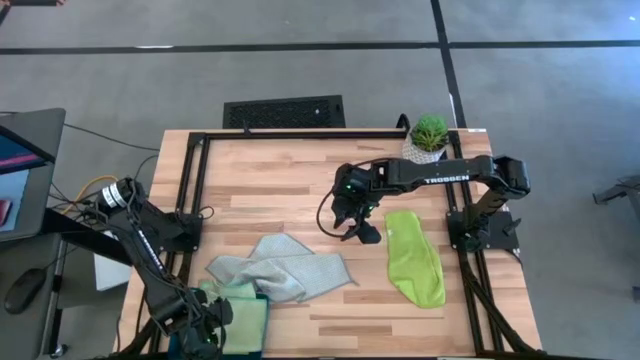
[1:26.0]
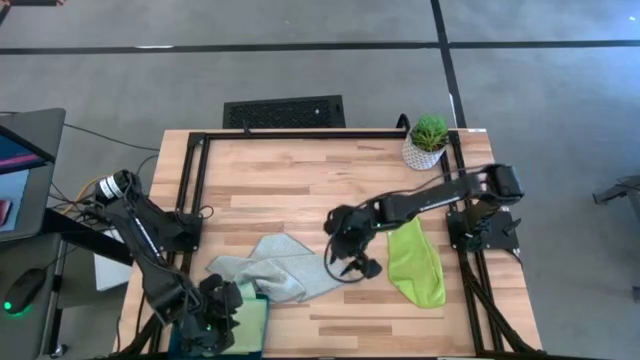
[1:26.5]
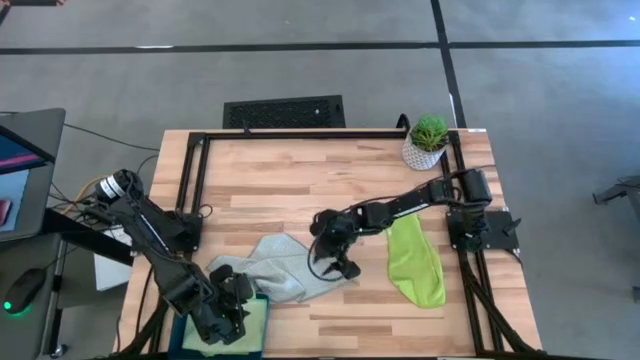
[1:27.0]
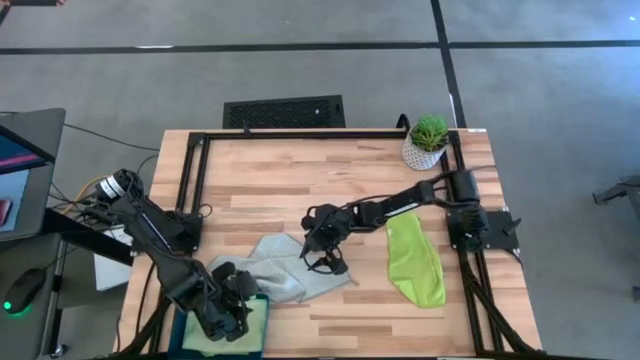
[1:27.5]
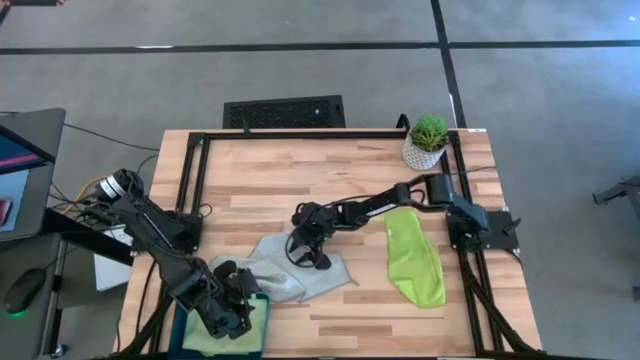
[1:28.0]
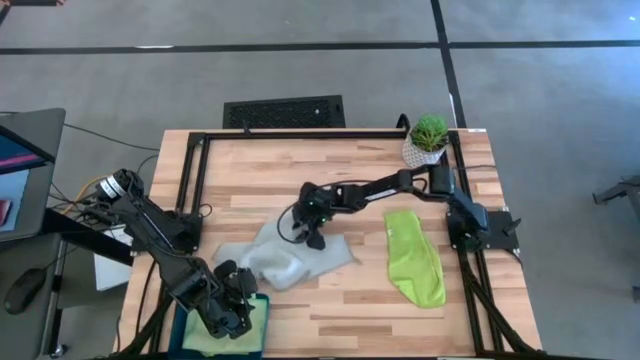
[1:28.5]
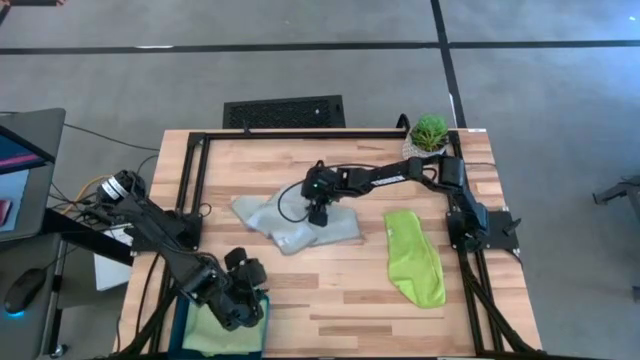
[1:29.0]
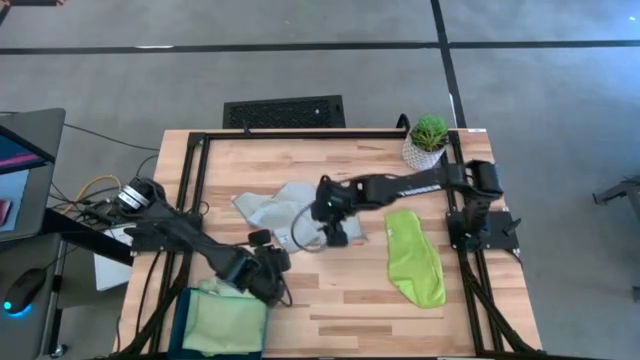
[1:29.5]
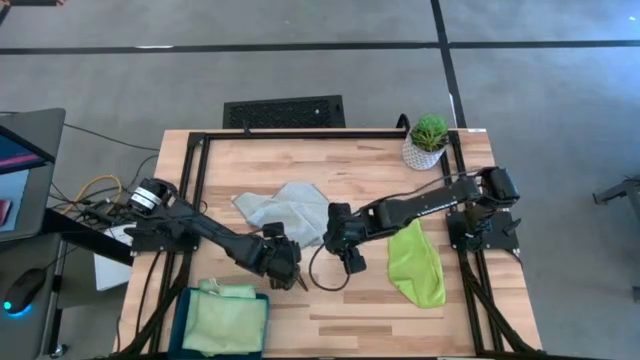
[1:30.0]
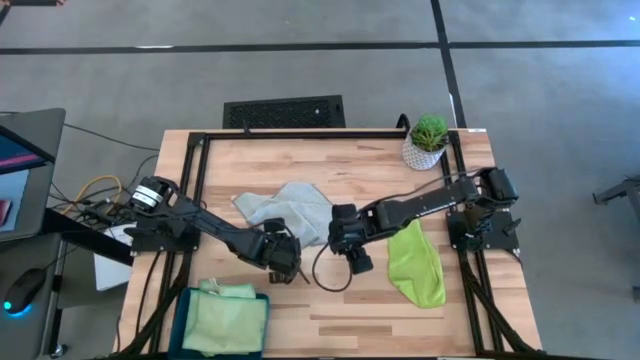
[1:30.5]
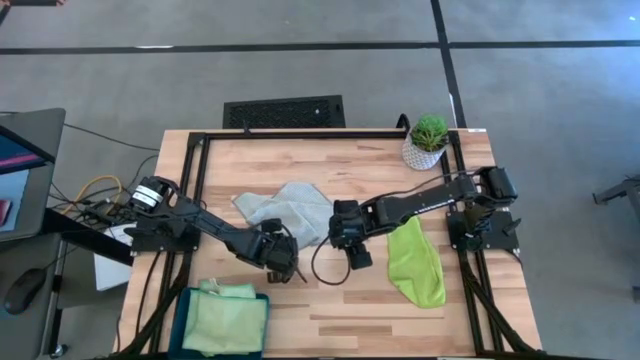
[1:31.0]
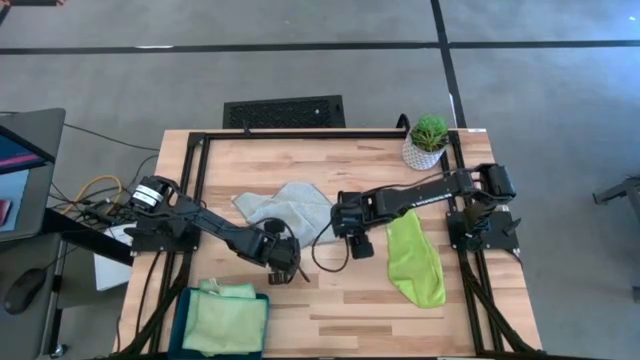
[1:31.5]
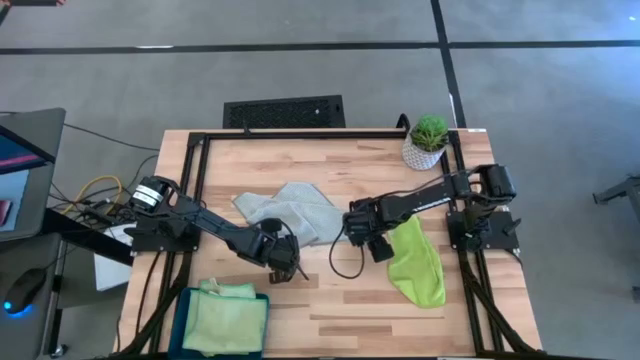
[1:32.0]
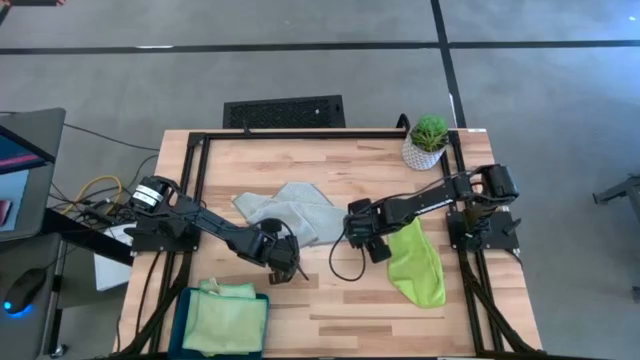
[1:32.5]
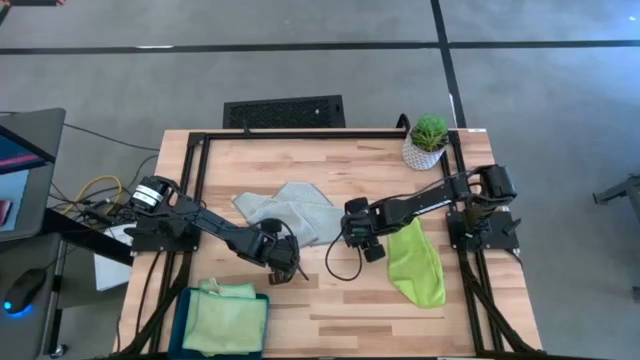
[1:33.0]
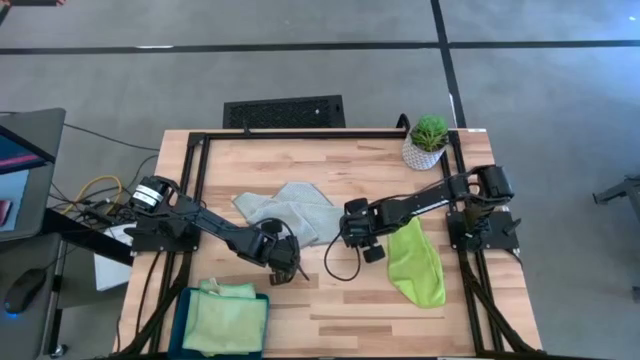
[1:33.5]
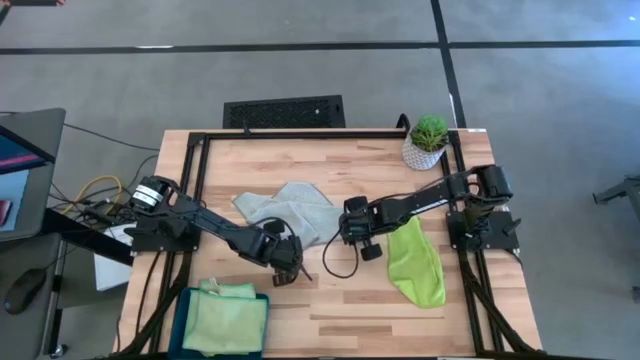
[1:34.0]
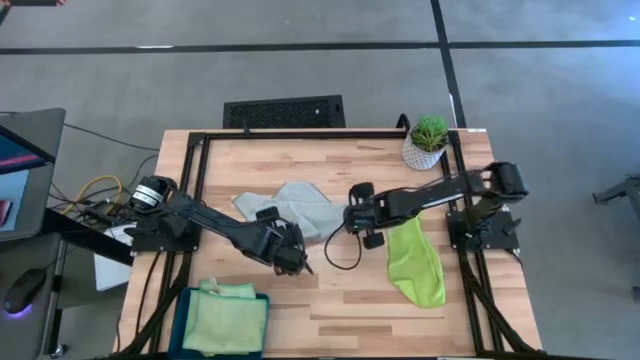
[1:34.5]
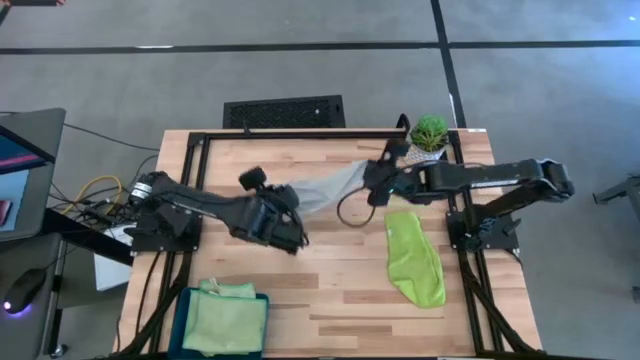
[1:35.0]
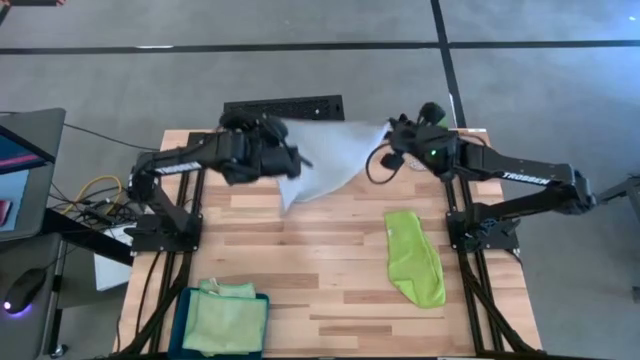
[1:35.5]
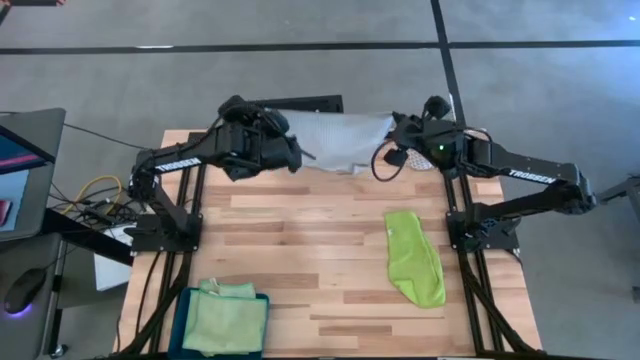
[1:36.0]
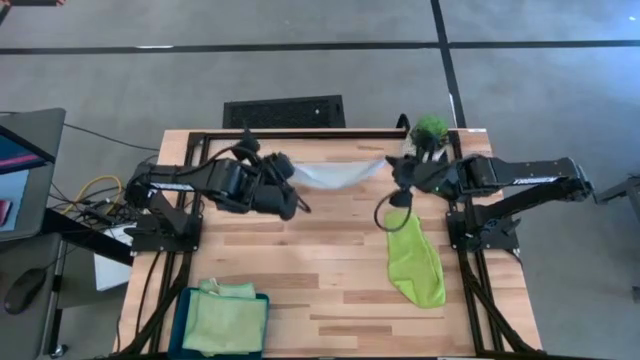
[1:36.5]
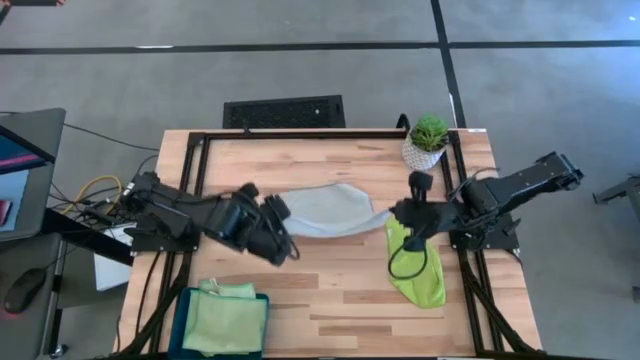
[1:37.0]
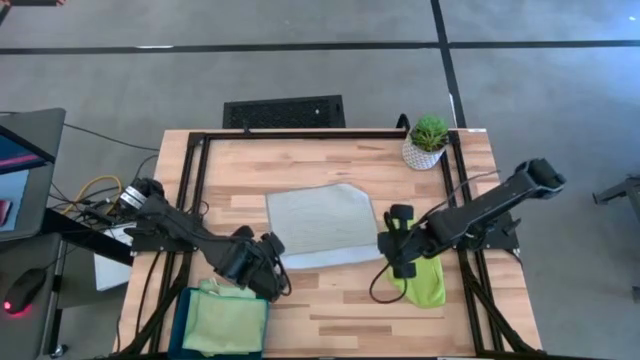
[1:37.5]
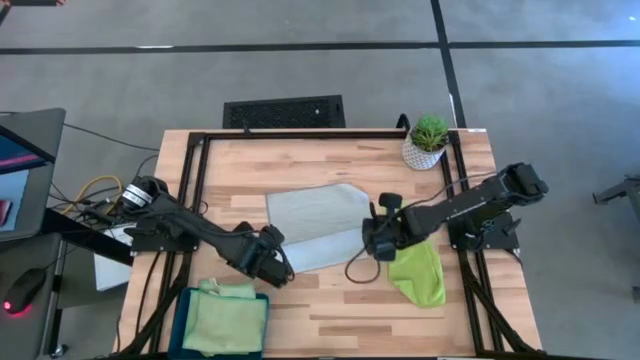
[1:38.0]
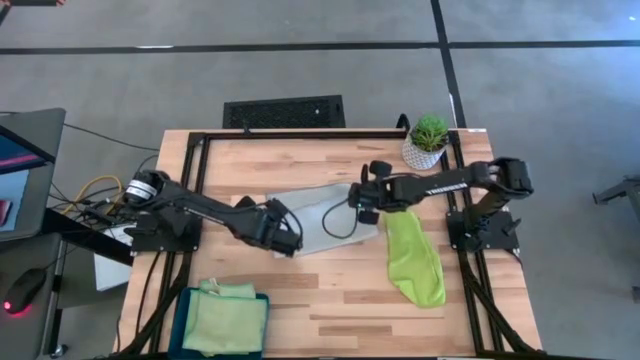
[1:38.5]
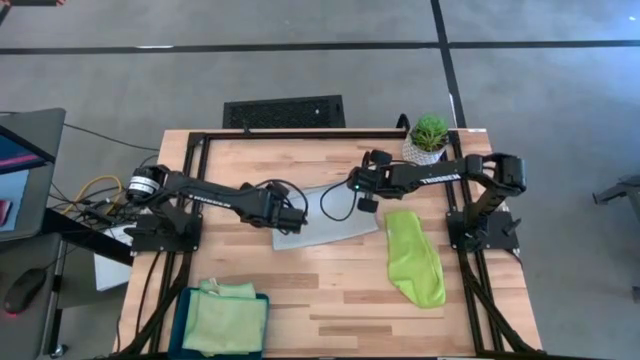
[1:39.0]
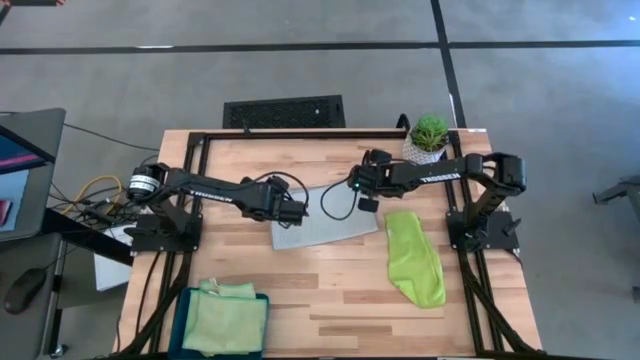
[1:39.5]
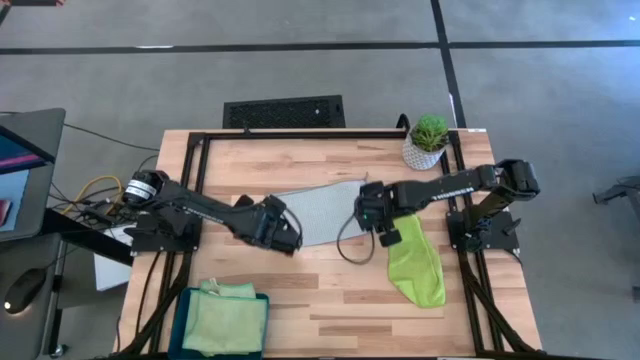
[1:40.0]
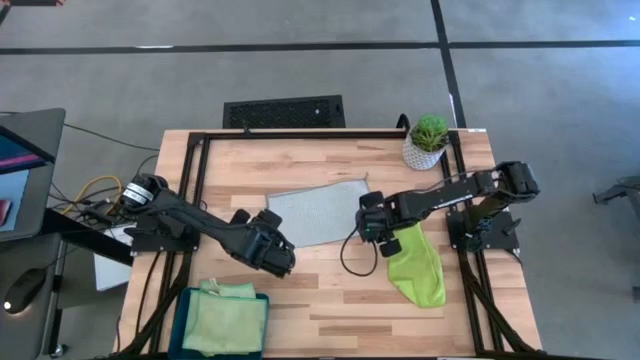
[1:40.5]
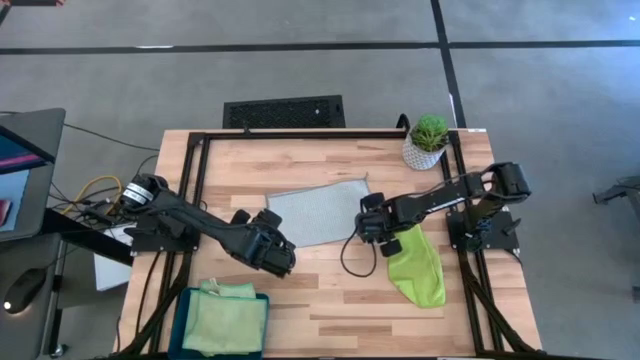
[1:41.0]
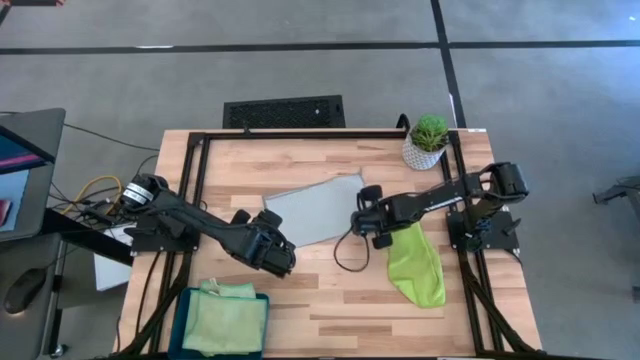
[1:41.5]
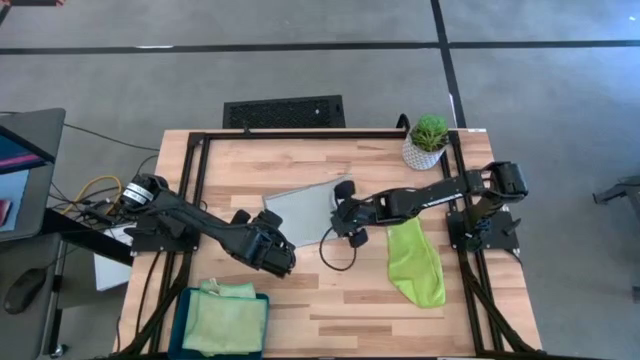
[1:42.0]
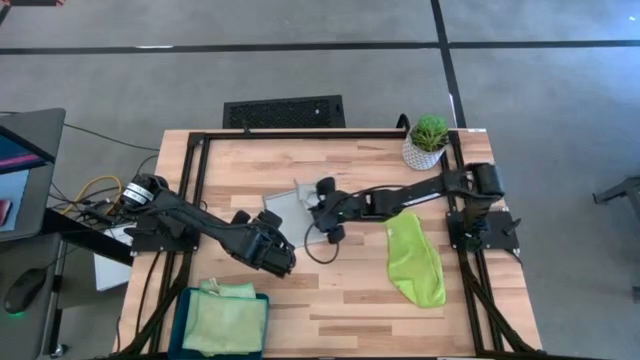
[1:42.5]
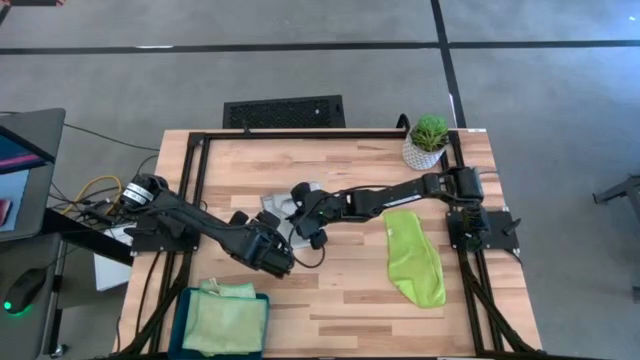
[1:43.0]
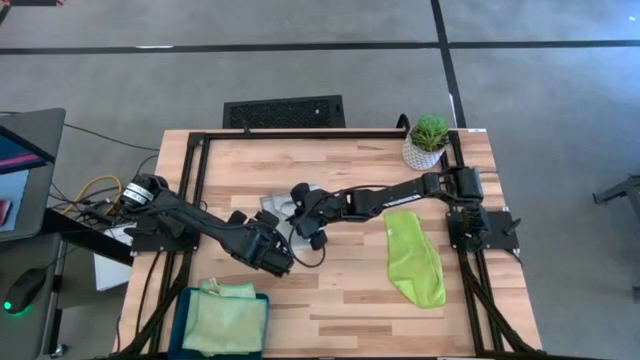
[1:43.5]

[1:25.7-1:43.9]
Task: Fold microfiber towels
Fold the gray microfiber cloth

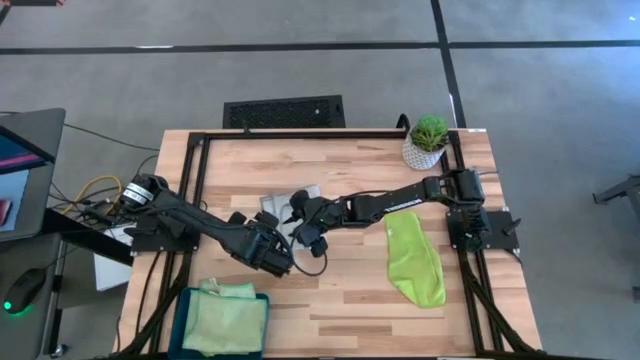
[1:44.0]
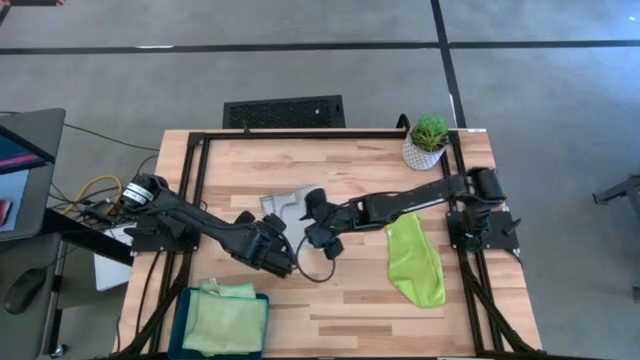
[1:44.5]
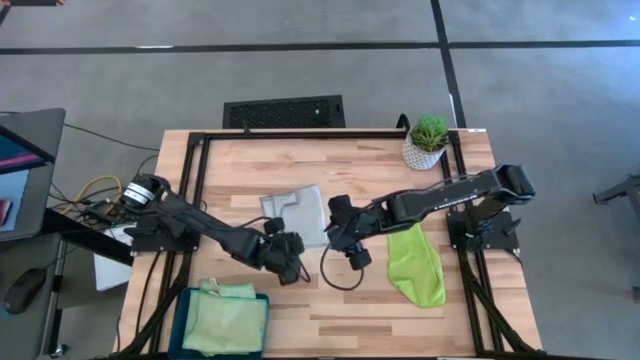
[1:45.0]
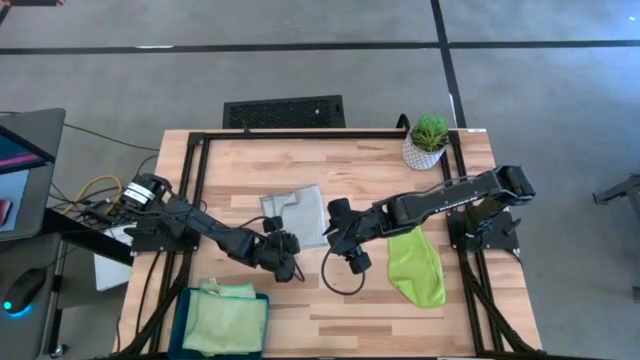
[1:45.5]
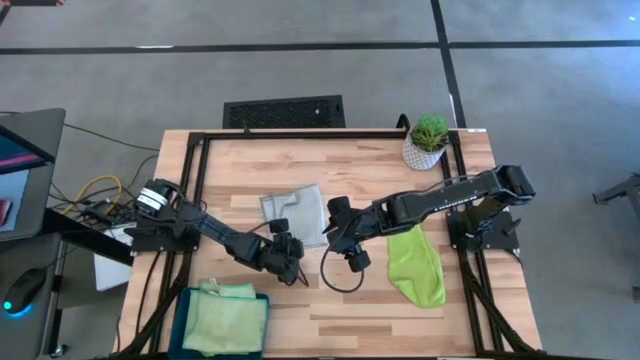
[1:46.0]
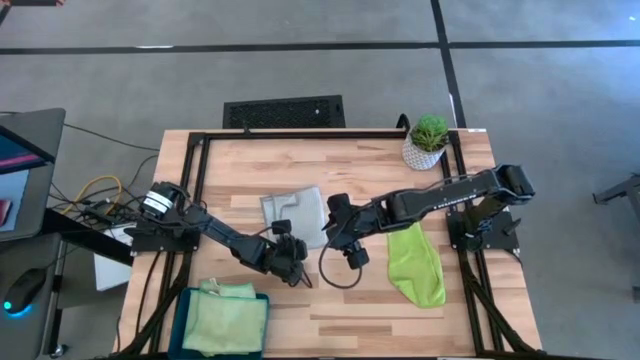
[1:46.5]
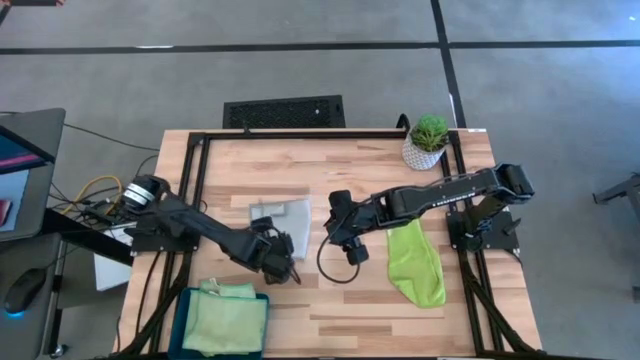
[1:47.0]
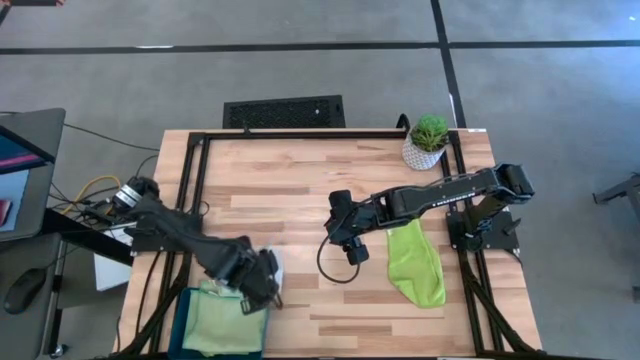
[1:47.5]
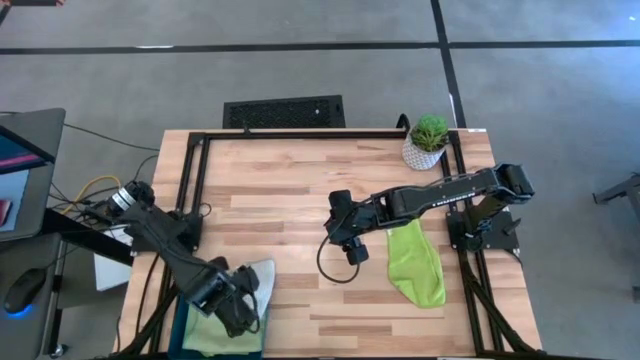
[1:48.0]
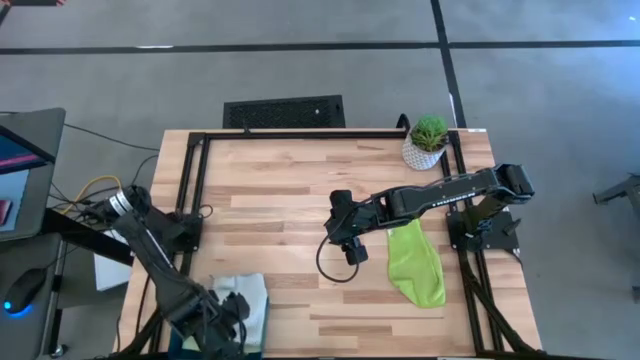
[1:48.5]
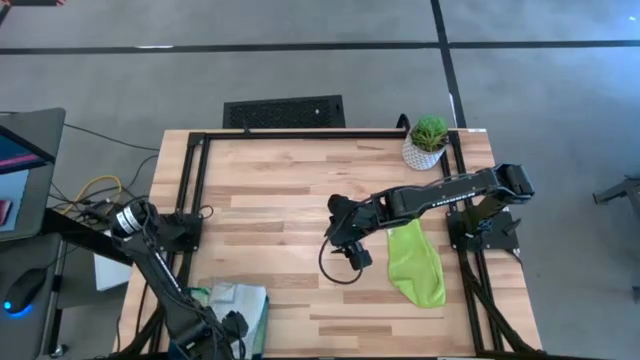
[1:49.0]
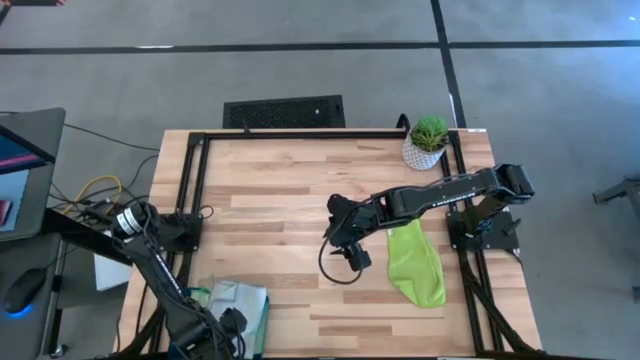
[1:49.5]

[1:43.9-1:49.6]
Put the folded gray microfiber cloth into the blue bin
